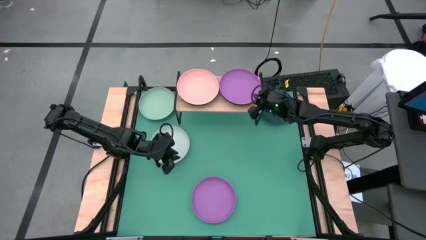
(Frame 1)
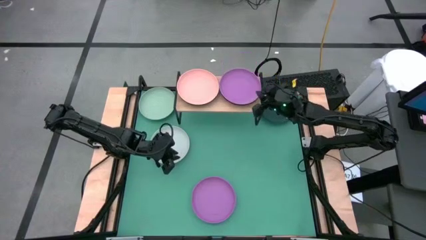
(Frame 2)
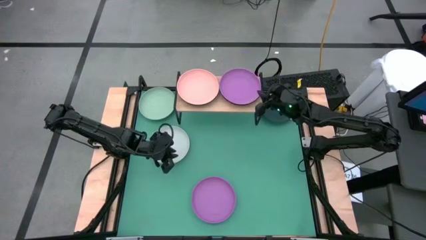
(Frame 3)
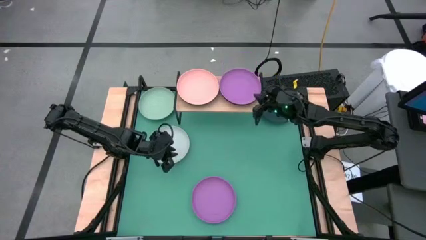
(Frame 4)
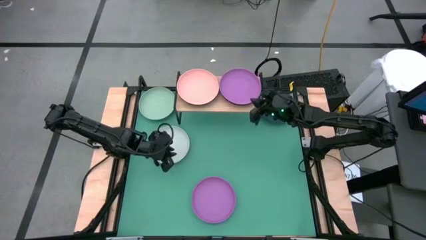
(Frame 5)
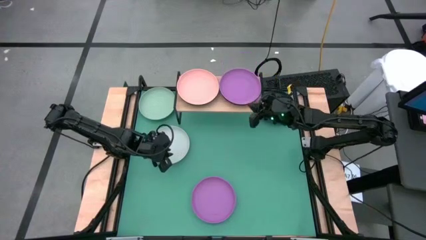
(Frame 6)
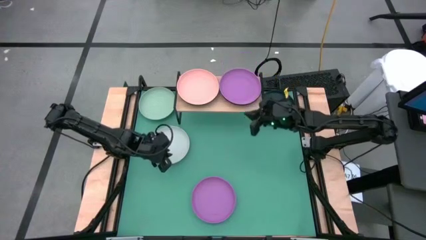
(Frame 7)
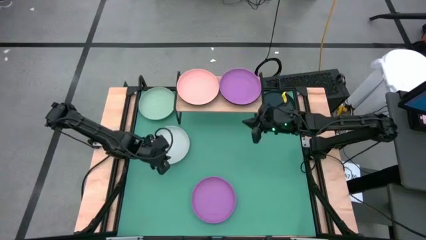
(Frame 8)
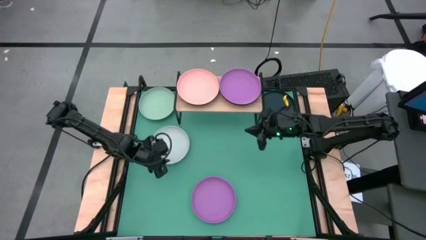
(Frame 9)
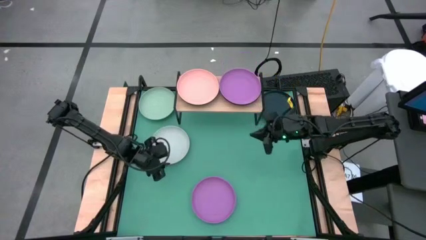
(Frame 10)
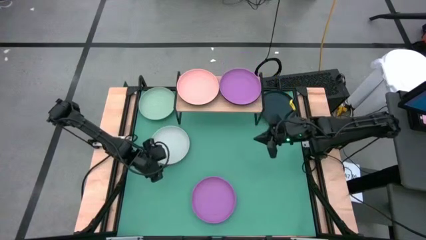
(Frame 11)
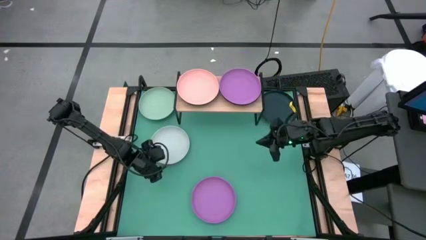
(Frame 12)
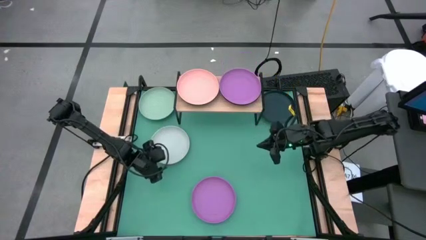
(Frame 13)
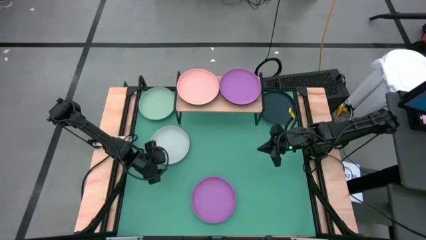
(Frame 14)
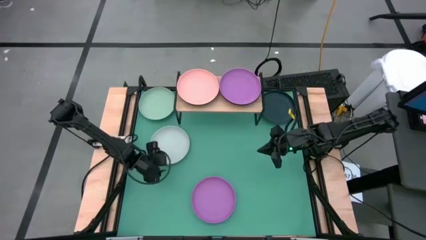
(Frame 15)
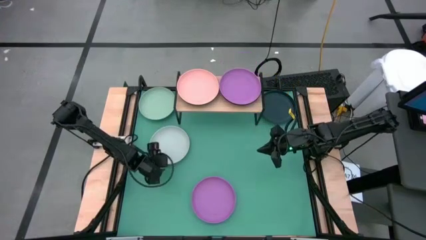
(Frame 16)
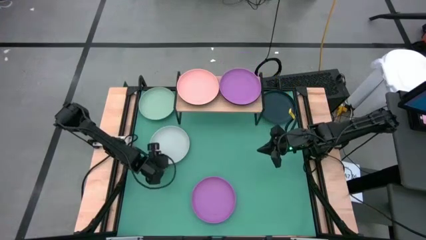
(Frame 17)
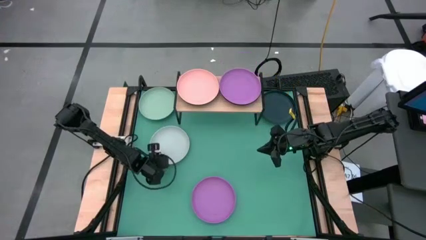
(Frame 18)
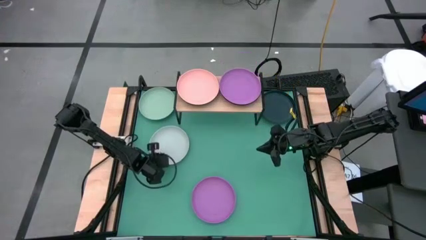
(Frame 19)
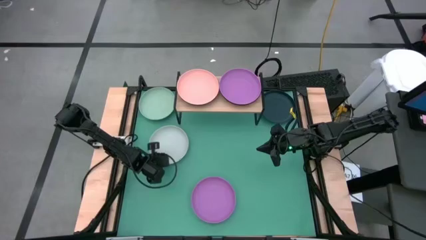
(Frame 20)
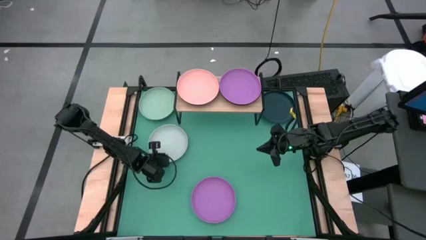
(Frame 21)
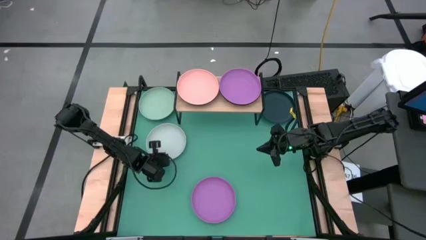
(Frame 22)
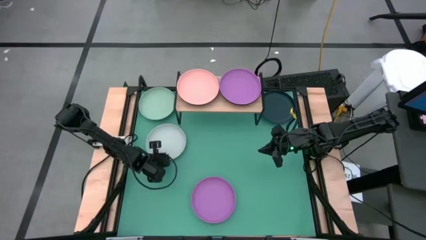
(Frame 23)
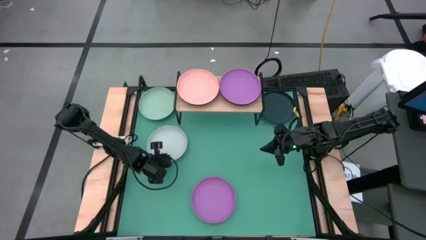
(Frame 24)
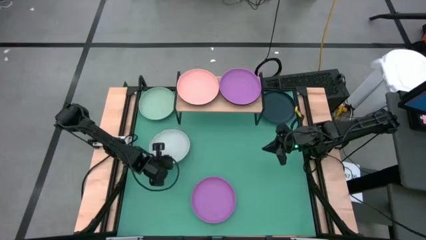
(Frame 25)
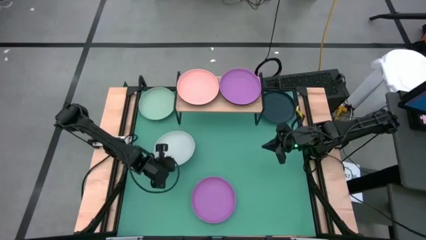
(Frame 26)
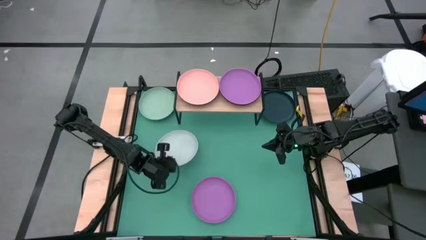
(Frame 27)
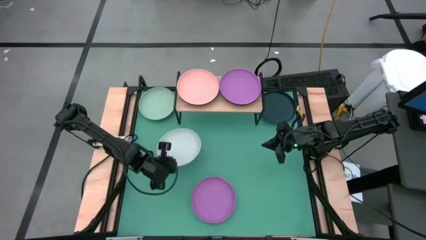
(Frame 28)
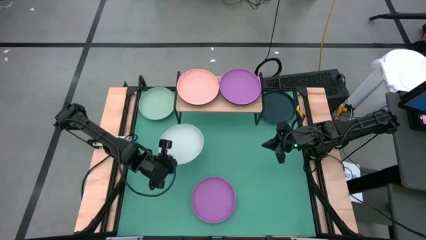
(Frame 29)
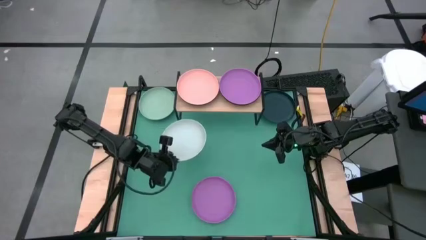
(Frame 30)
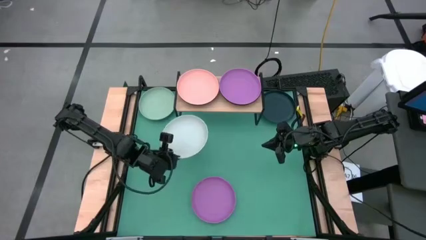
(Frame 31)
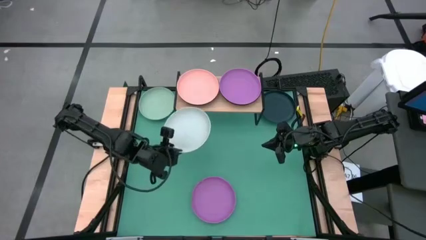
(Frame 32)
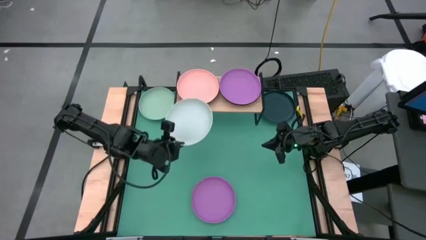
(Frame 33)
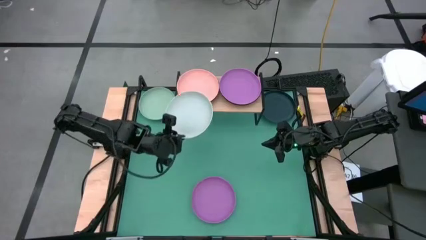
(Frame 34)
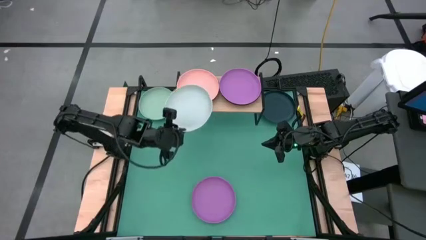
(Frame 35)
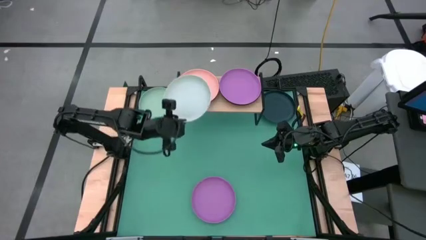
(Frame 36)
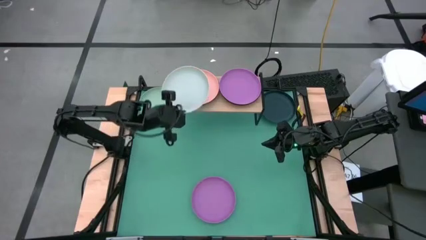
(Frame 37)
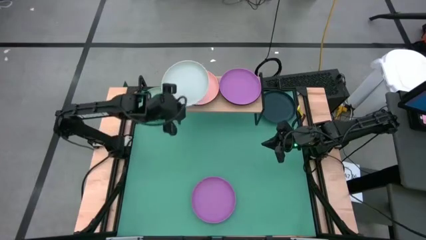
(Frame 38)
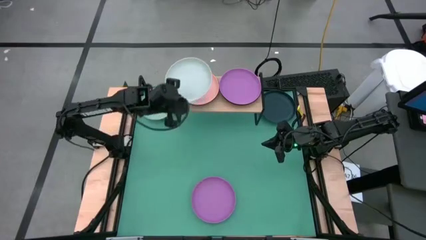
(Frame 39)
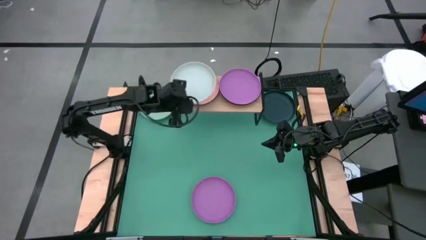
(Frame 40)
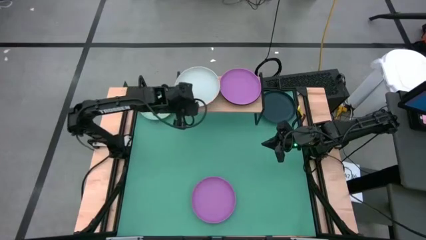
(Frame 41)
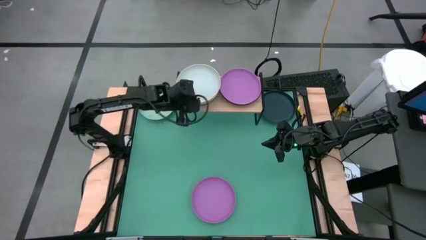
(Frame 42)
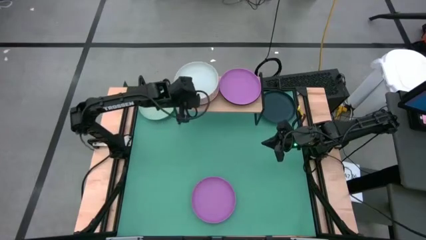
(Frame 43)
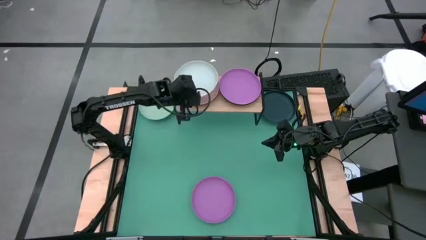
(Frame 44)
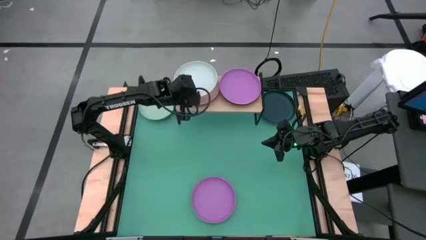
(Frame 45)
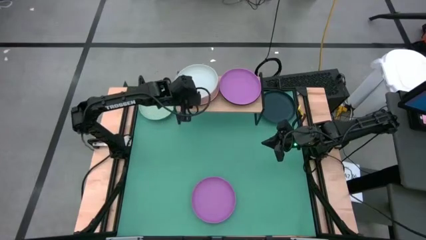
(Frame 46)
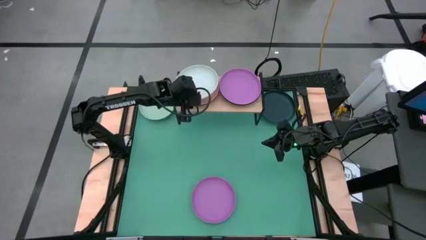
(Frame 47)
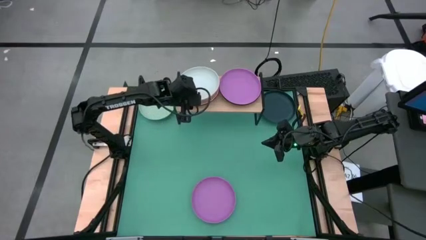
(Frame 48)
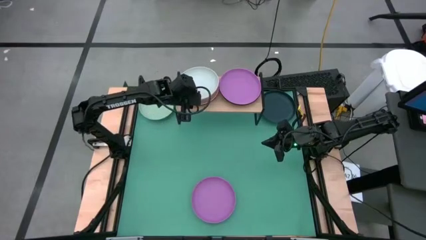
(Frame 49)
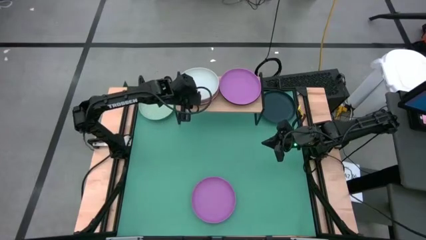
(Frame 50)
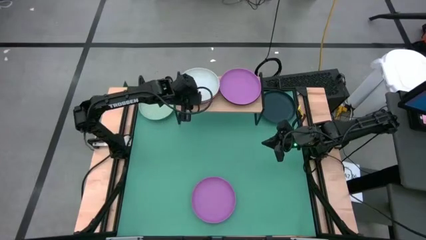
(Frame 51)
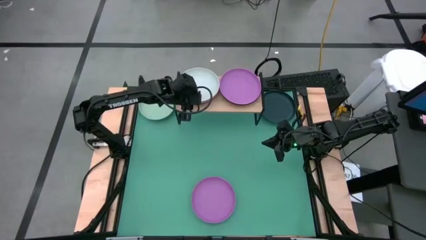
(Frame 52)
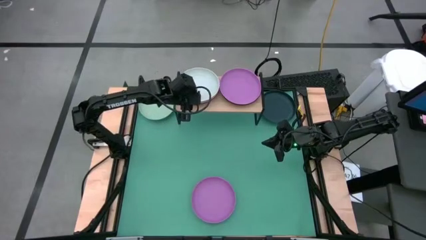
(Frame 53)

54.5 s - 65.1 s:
Task: Place and stack plates onto a shelf
Stack the white plate on top of the light orange plate on the shelf

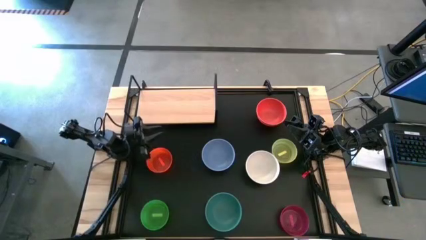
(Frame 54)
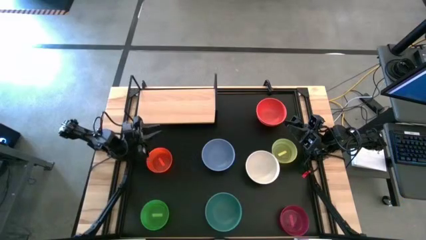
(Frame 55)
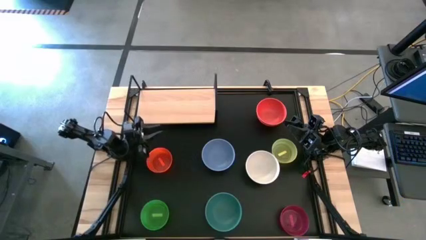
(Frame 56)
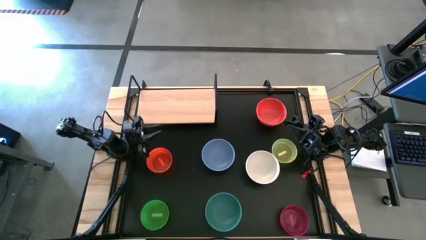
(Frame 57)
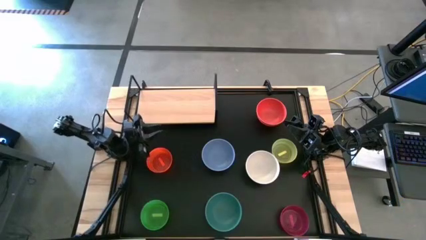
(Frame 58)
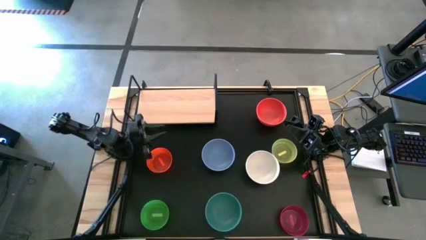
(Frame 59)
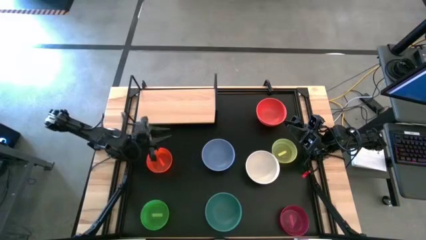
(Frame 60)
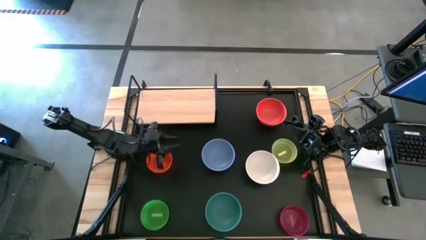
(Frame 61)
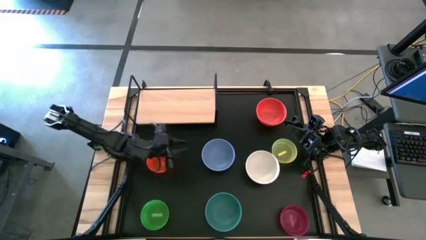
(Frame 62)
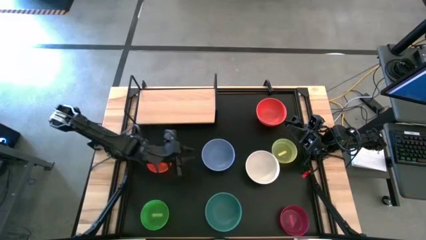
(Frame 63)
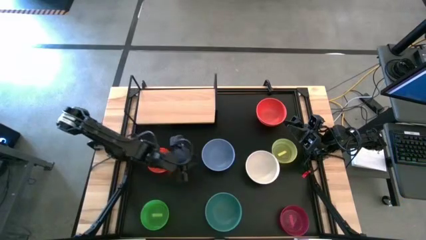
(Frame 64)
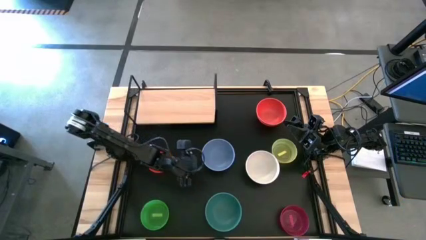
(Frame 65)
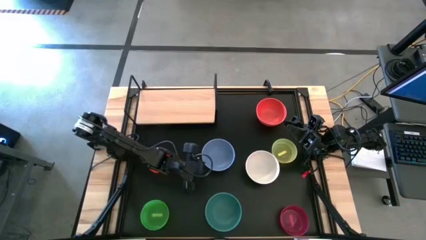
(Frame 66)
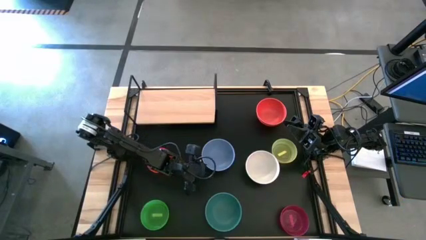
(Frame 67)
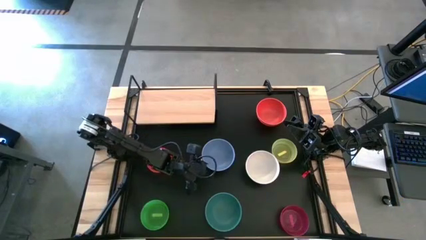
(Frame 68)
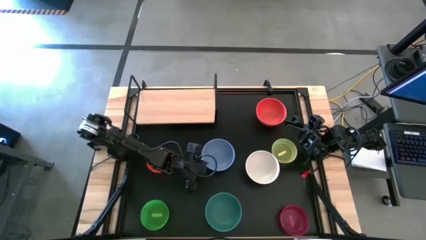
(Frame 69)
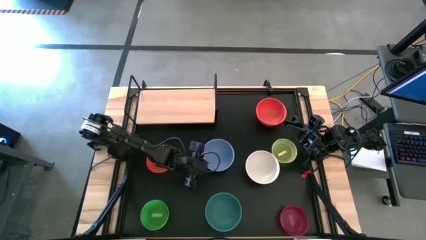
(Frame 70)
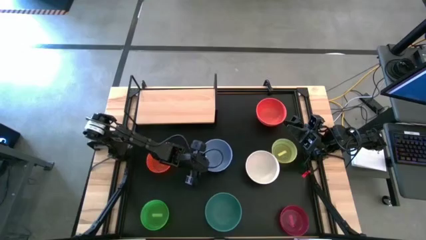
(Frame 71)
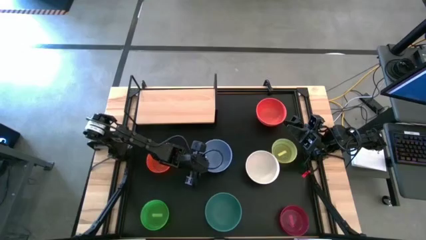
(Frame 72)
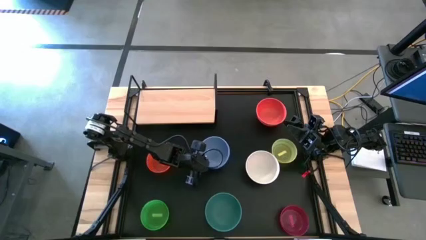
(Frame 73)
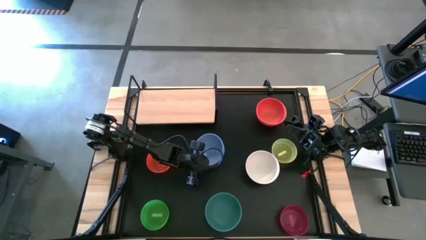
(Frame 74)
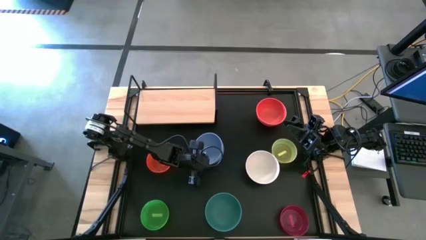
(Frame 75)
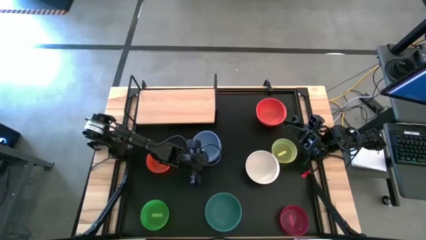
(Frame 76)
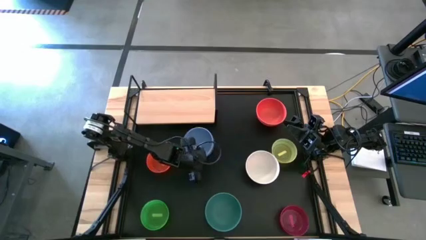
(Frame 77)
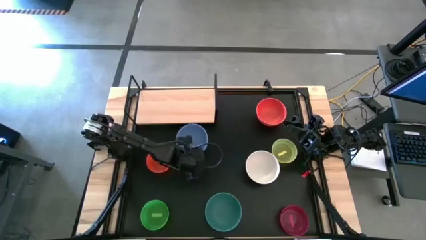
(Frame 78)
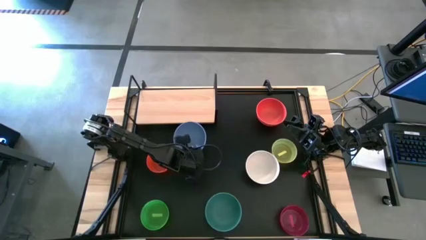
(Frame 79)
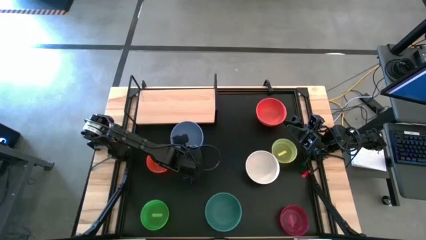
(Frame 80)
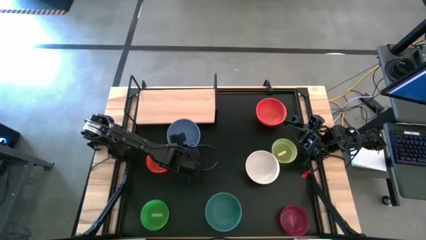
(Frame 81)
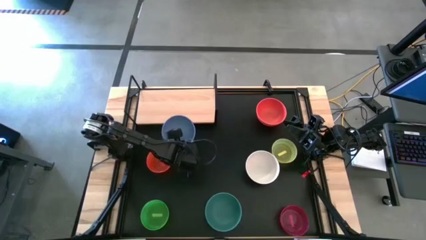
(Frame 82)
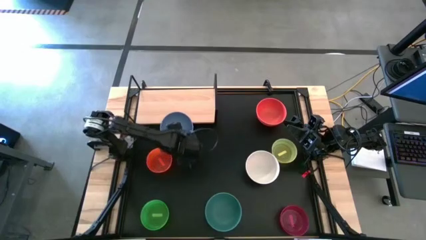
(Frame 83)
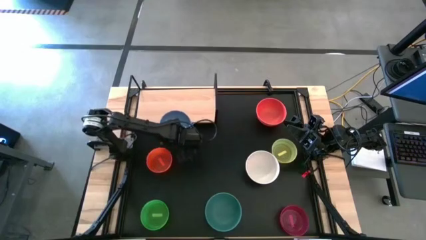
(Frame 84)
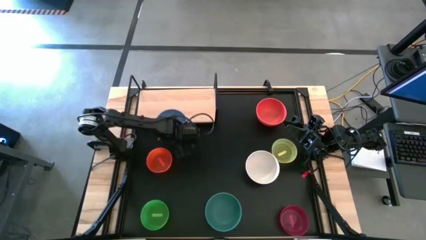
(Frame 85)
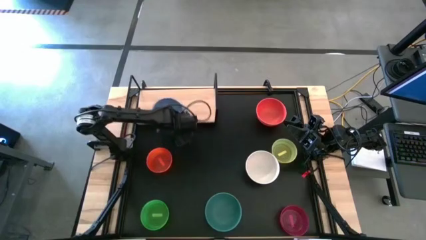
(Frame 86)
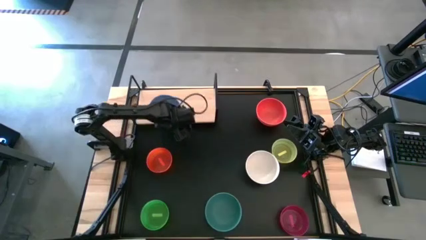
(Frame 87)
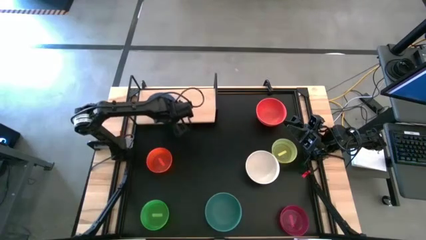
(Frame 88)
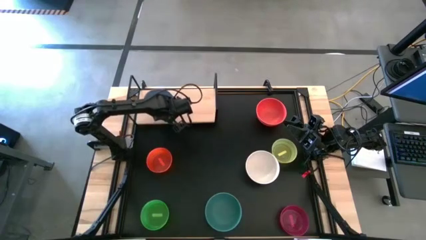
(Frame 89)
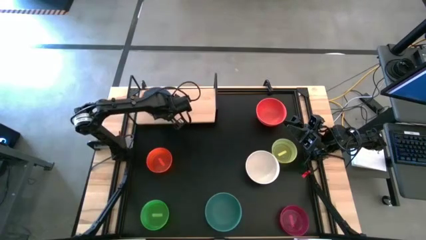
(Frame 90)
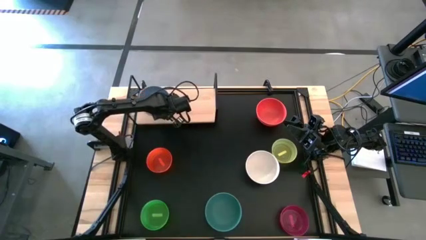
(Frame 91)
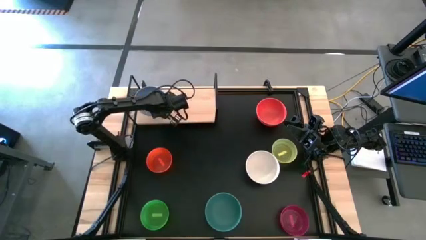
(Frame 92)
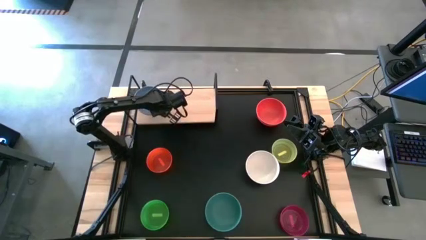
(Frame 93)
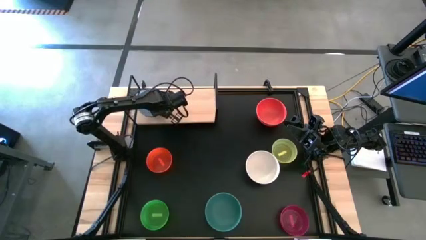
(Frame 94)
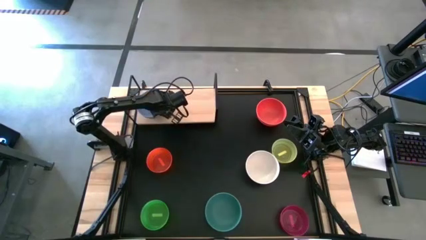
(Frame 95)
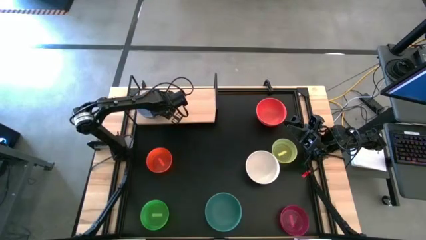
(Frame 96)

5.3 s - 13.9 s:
Task: Place and stack bowls onto a shelf
Put the blue bowl on the shelf
